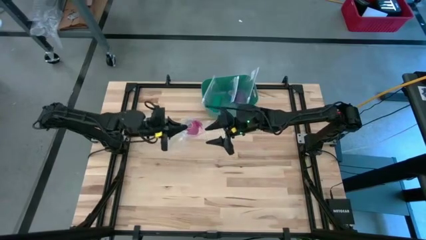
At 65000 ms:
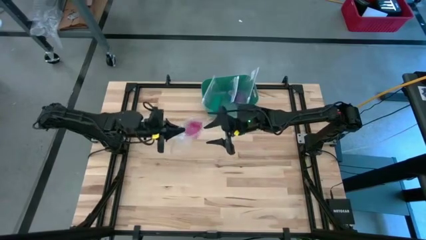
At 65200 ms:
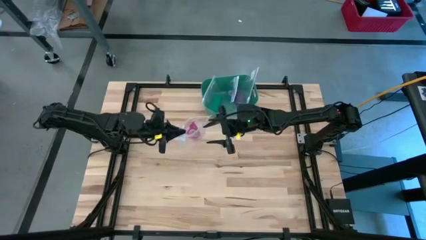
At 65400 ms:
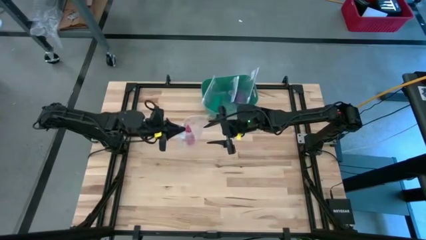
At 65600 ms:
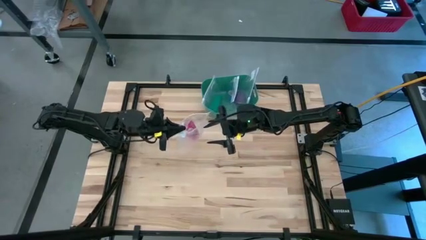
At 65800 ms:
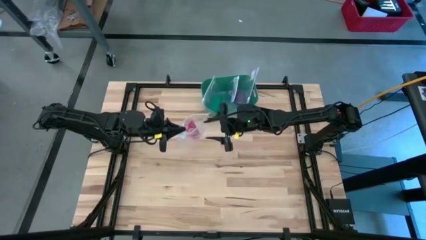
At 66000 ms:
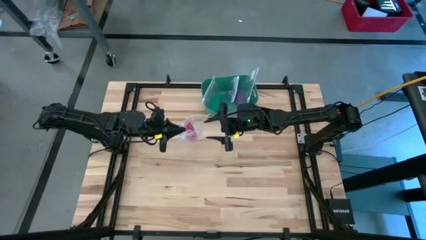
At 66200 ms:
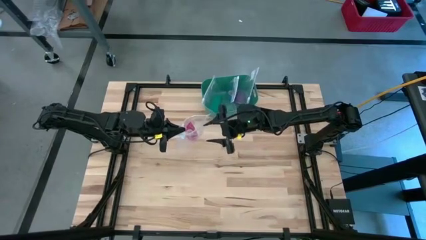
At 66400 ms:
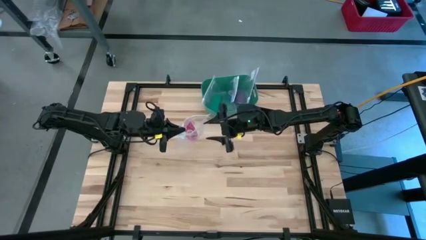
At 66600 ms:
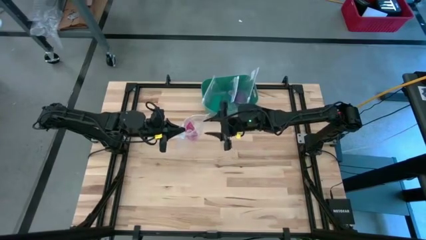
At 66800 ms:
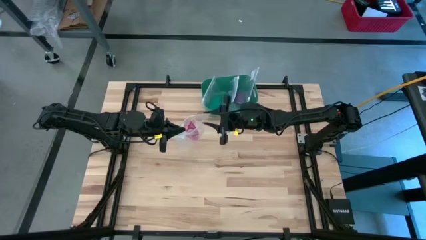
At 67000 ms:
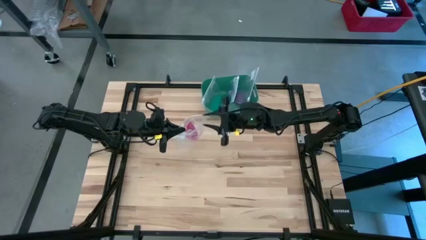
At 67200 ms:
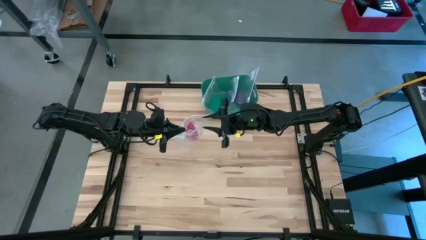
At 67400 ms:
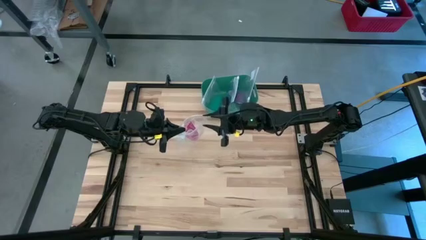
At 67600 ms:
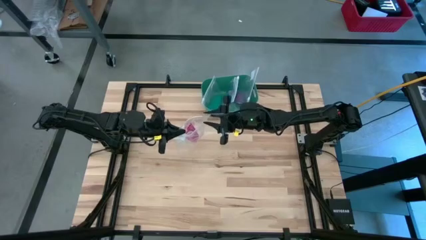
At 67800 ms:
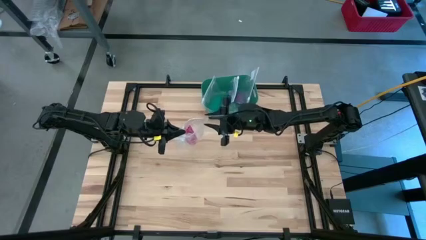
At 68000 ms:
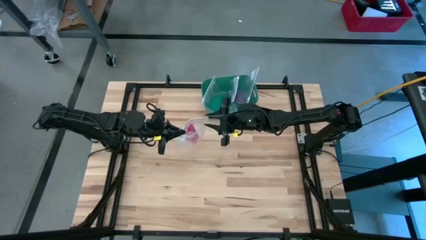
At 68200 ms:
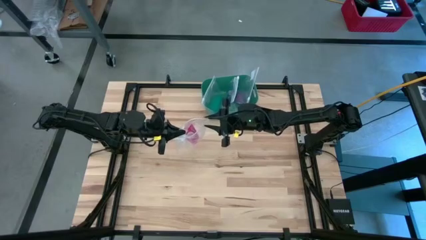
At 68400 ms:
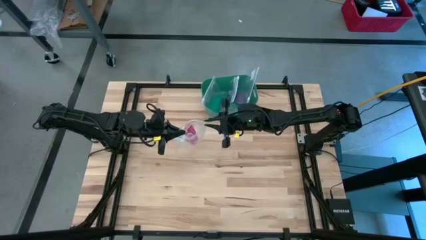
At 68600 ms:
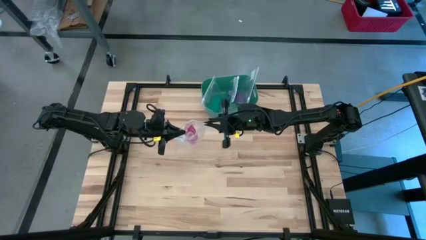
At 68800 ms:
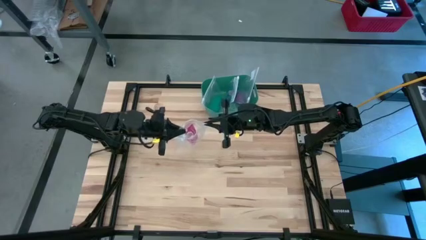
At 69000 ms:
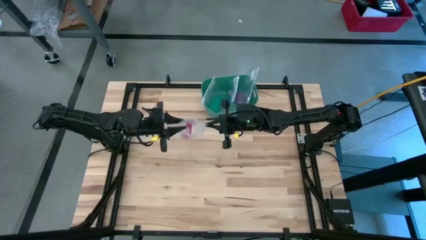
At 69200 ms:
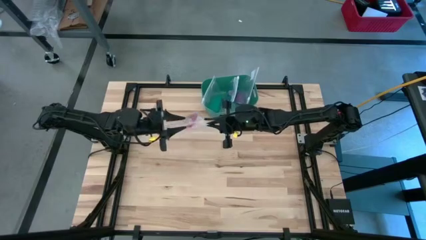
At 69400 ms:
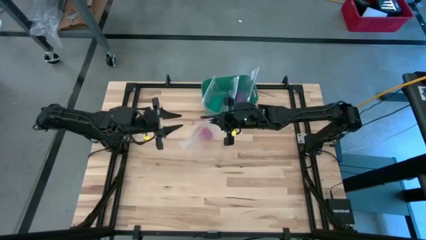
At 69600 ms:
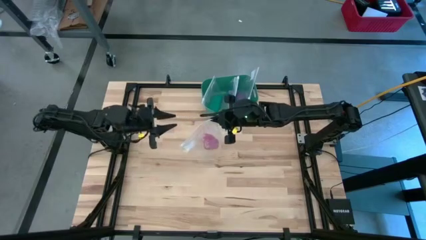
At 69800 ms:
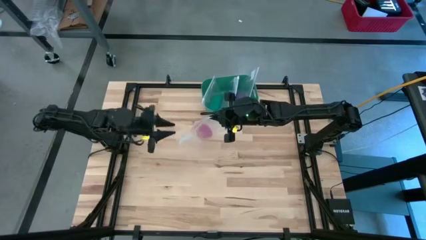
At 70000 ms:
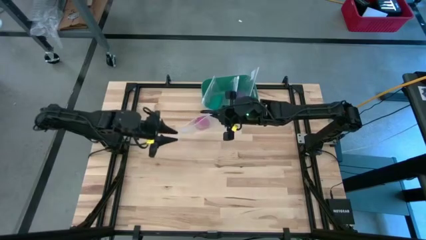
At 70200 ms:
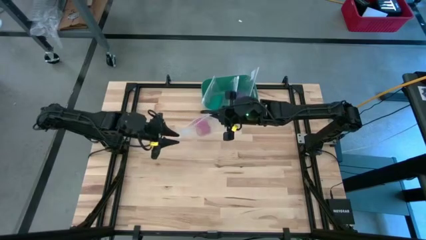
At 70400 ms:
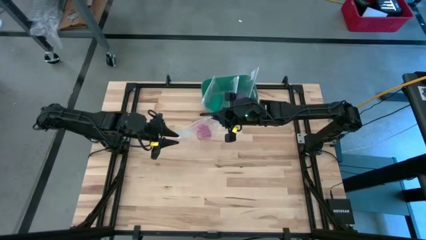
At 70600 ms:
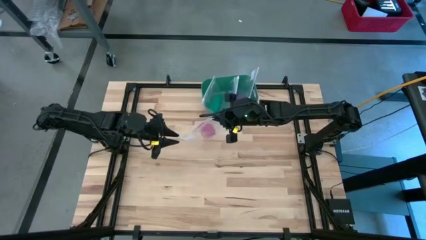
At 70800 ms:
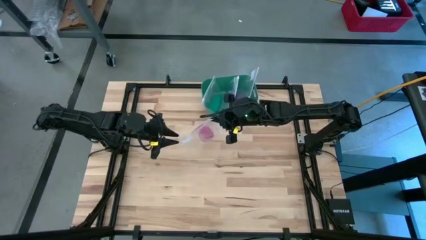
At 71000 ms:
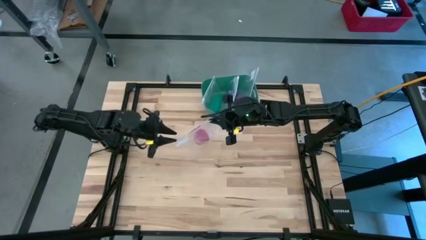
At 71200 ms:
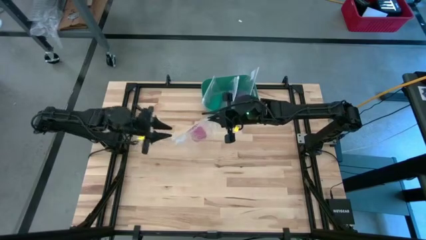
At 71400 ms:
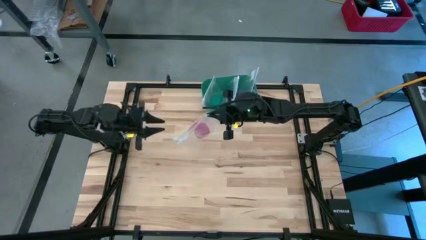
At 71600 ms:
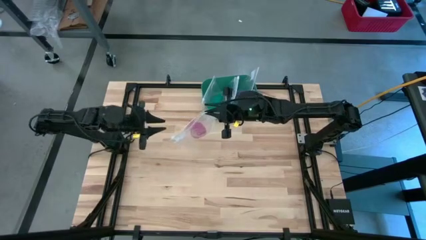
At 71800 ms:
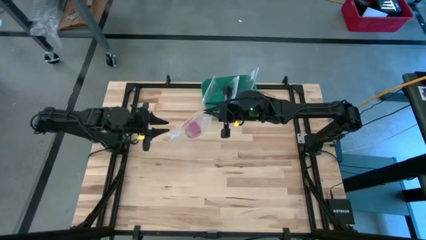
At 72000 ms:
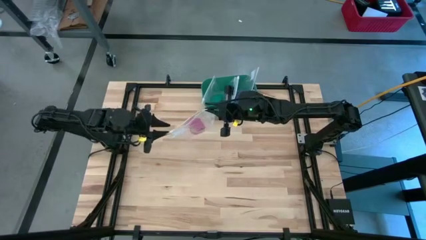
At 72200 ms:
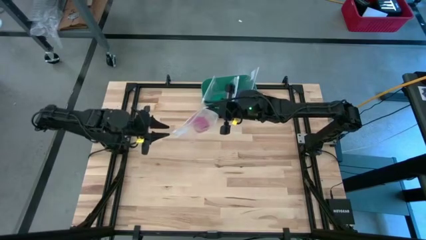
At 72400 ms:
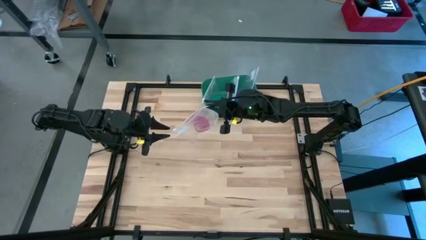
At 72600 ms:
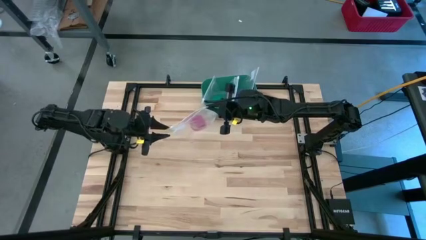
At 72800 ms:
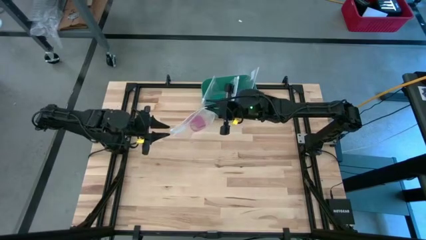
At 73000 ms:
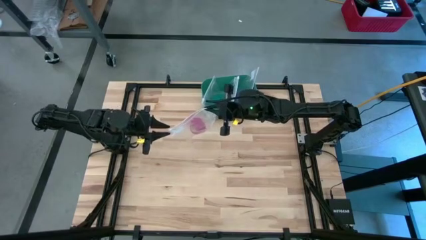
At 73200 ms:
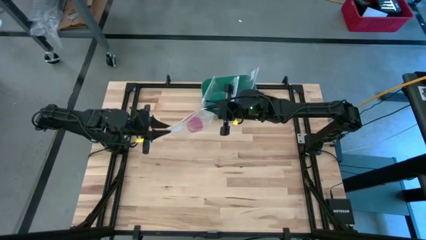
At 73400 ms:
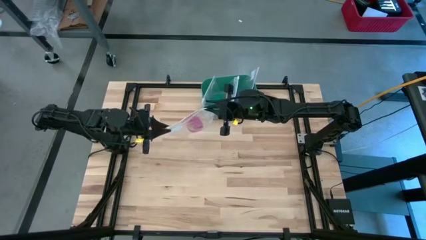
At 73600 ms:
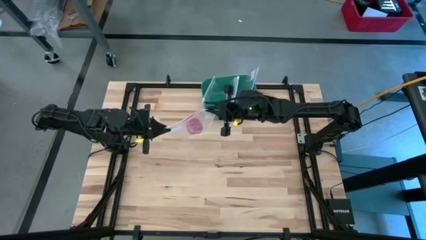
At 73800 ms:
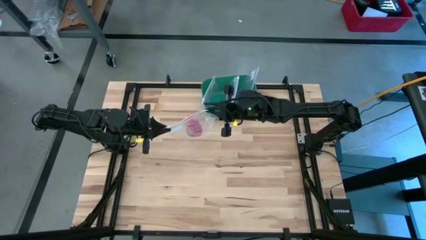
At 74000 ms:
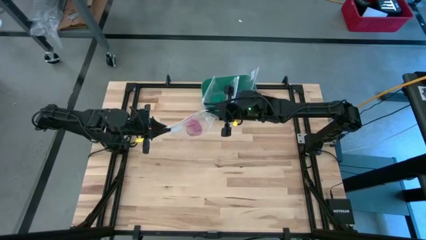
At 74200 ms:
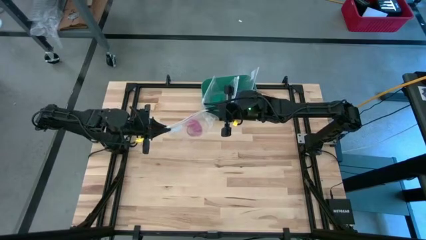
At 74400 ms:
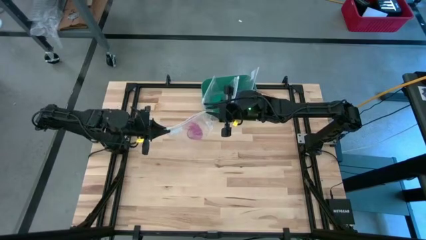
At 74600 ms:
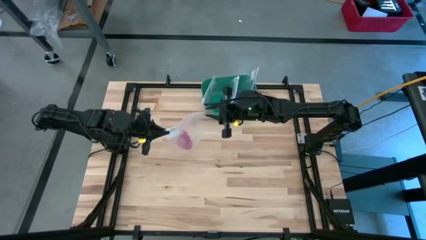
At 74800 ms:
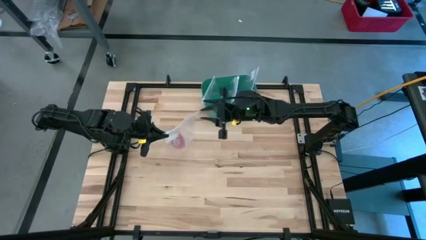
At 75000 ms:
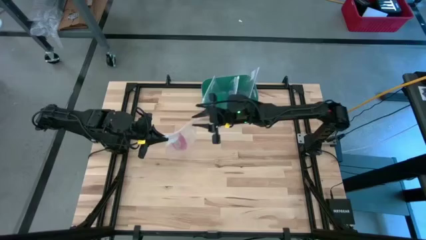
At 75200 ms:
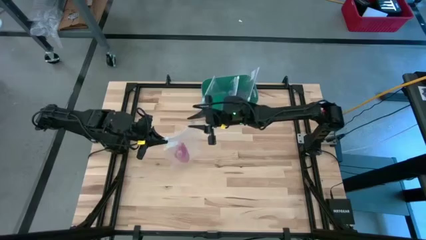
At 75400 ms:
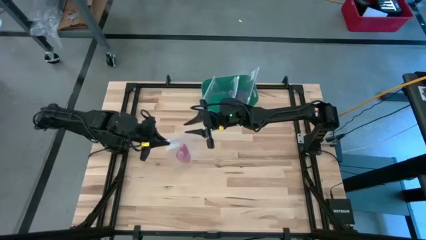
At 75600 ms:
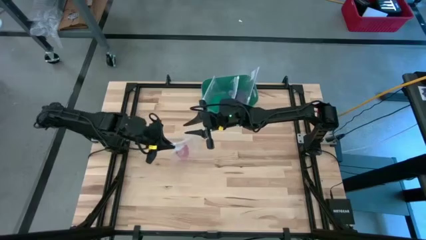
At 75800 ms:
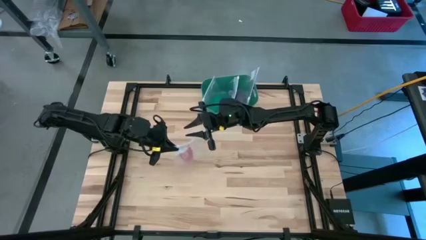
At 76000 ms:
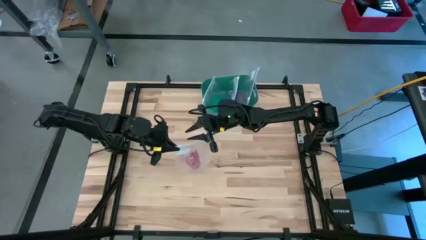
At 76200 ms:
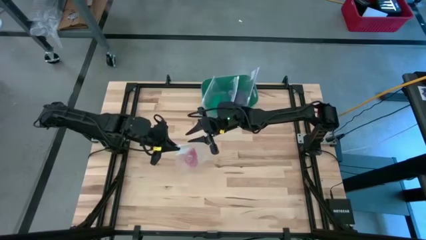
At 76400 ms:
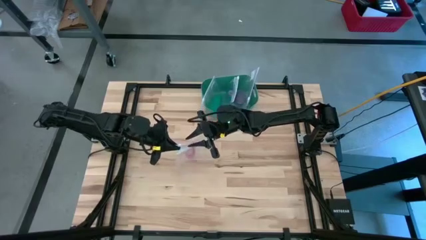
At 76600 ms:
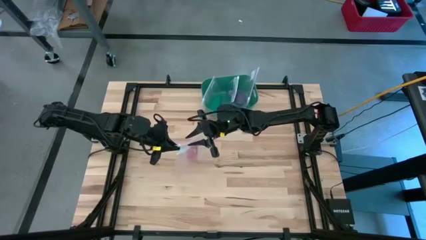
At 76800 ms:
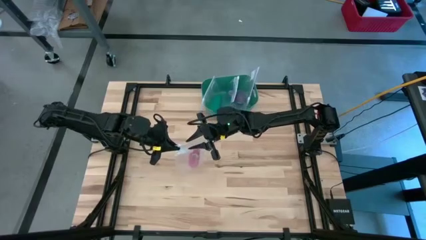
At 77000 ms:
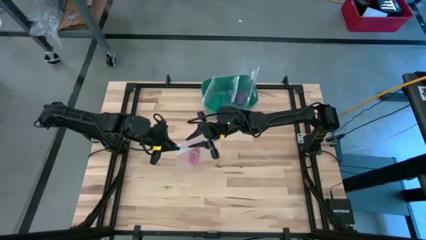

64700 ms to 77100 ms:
Task: Roll bandage
Close the transparent zip bag
